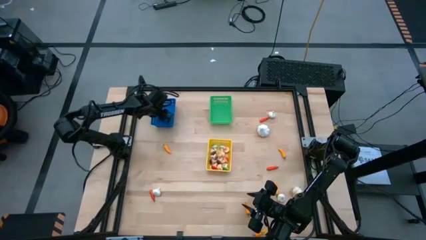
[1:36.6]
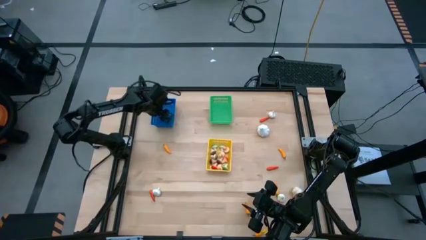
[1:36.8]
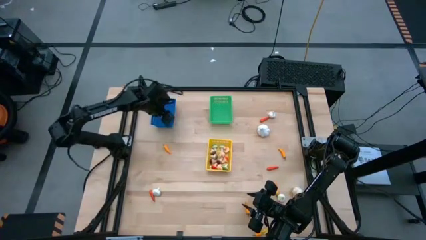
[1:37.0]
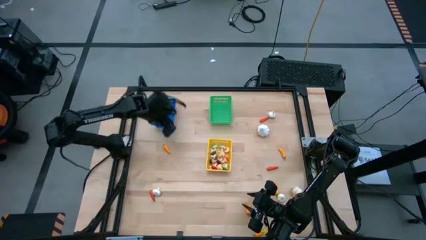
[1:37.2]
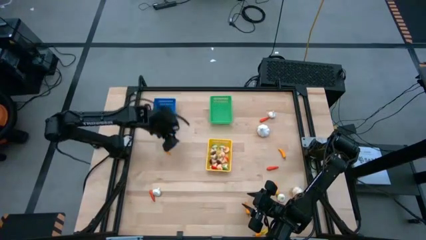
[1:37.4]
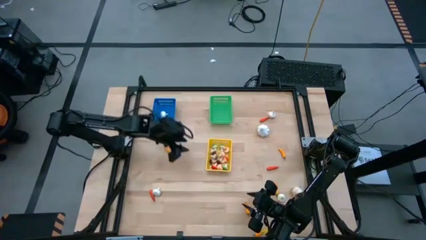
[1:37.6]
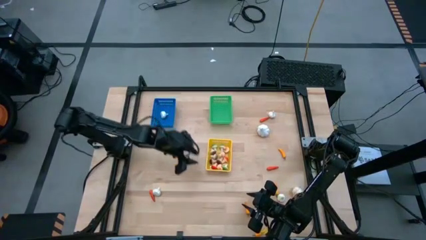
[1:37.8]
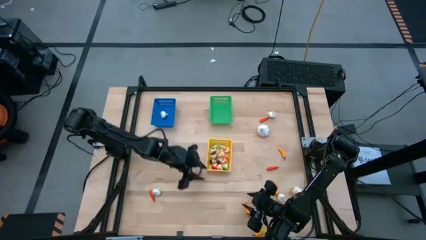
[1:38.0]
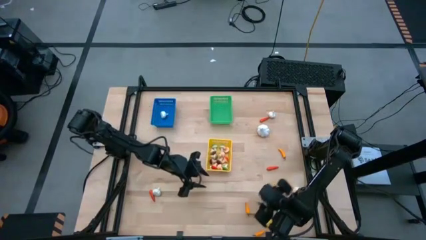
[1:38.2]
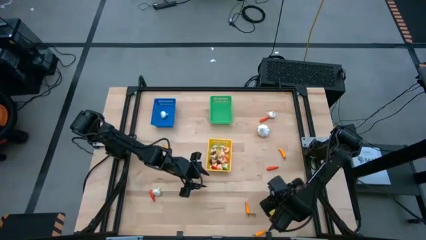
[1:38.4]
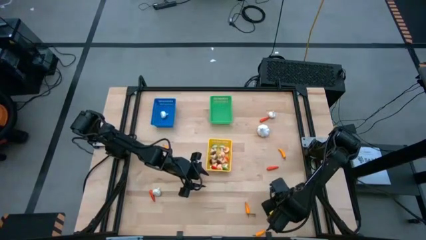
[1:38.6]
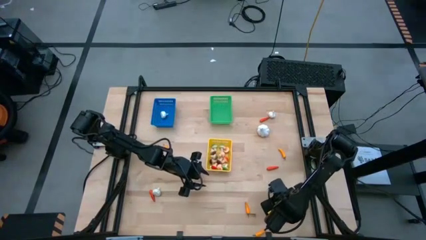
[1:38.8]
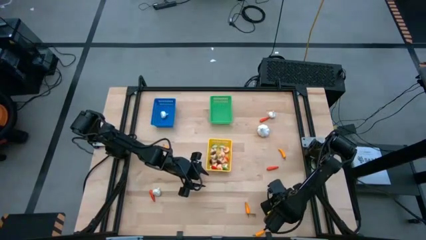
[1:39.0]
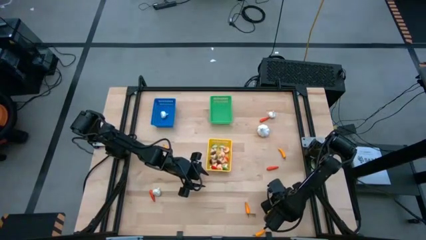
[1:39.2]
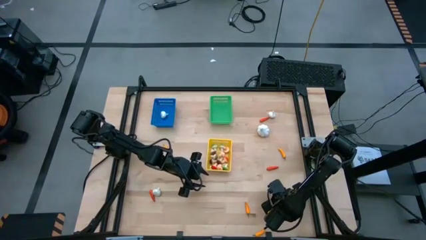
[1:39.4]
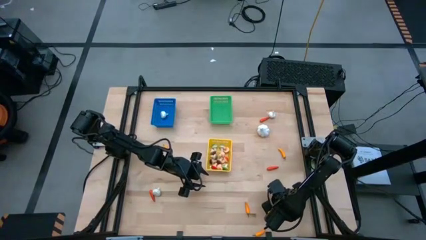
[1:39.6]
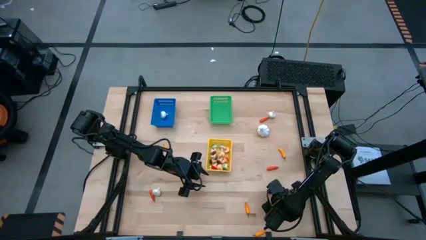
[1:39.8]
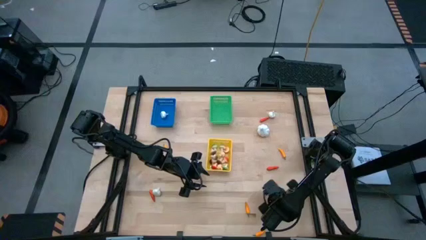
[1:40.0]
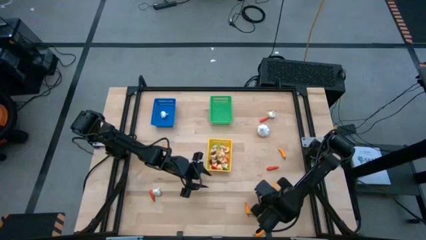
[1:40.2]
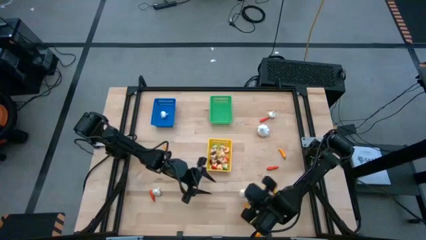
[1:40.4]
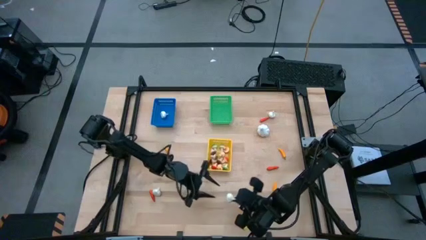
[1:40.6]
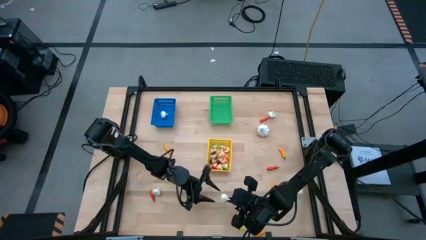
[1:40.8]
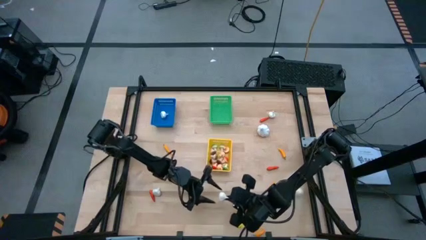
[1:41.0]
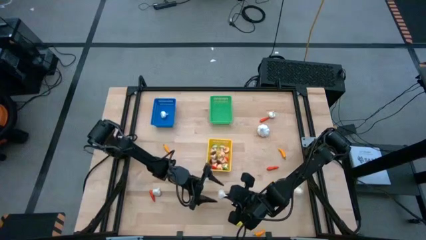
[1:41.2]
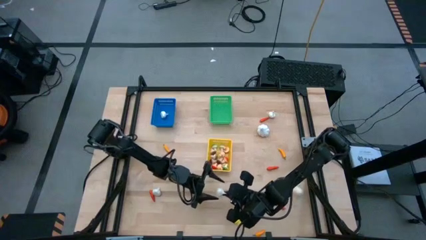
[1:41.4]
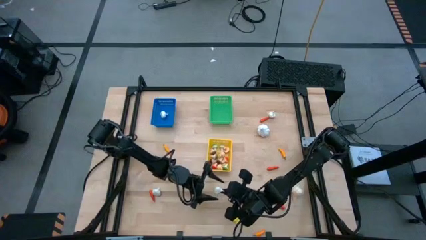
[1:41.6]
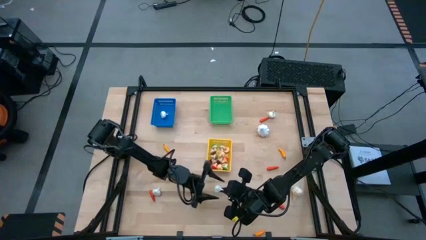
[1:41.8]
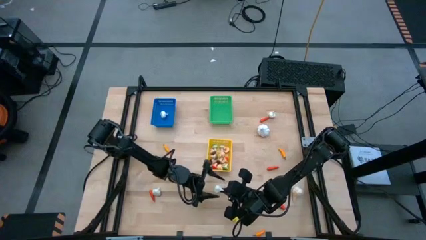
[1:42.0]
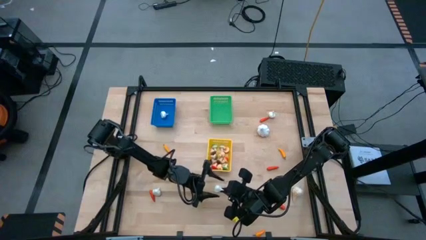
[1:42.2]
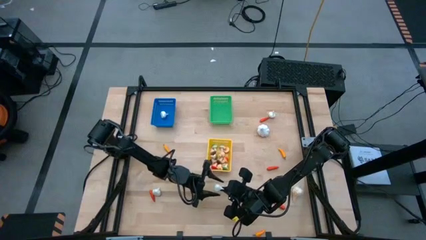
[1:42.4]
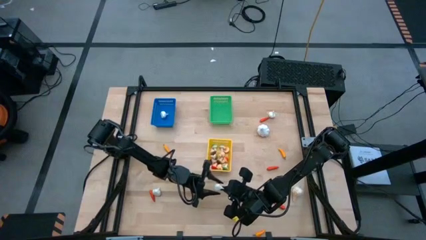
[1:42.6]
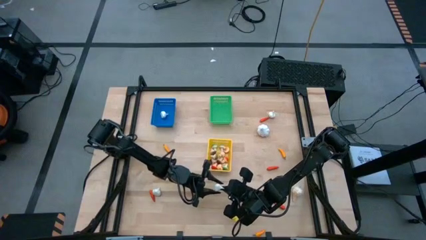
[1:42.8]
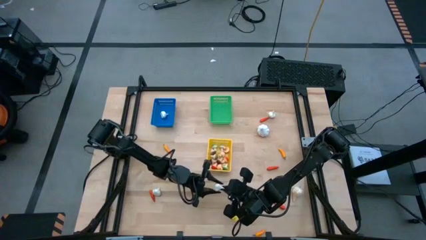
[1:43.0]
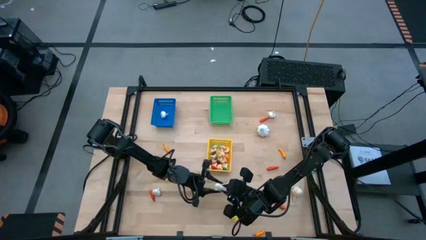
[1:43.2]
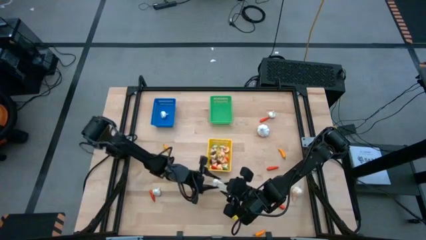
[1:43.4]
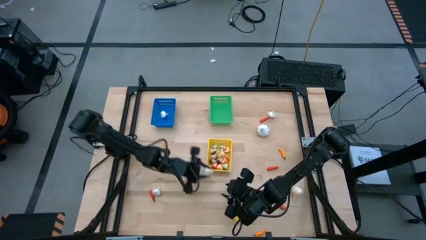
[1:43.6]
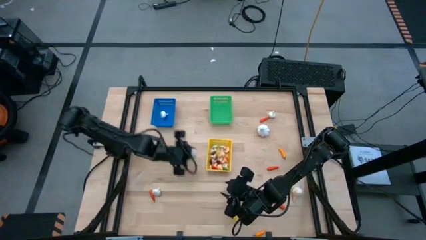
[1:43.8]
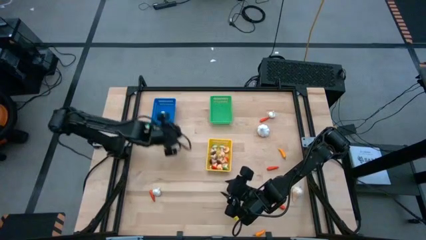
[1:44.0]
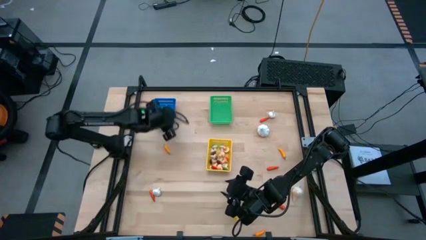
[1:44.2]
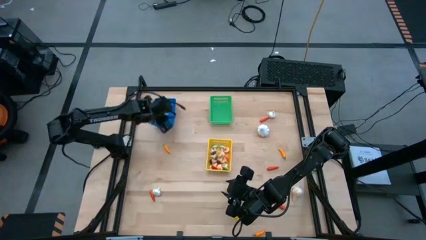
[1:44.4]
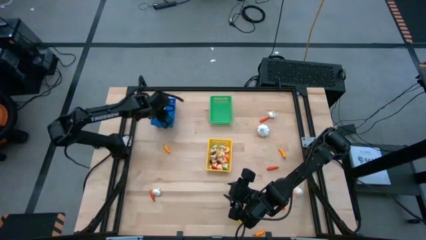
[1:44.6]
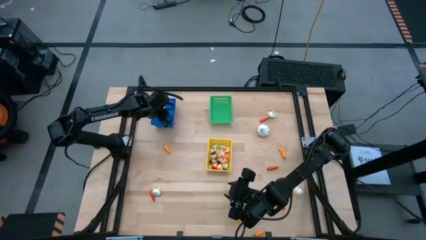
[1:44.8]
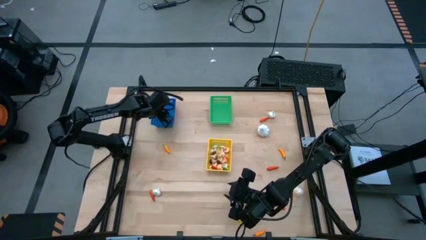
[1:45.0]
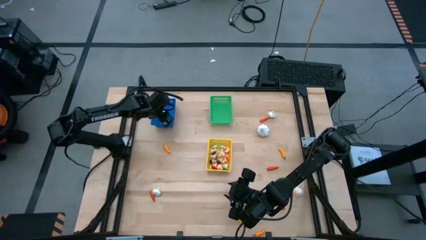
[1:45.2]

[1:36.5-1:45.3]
Task: Sort produce into baskets
Put the white garlic into the blue bin

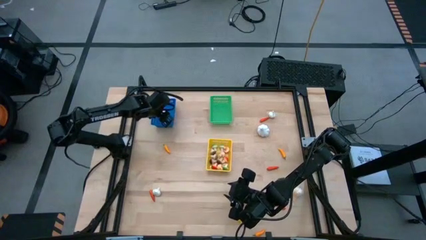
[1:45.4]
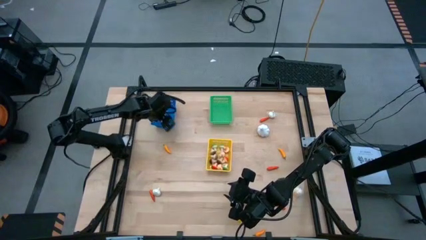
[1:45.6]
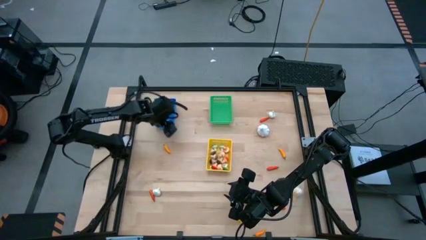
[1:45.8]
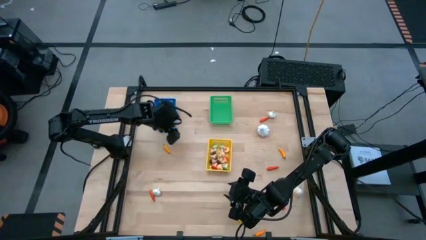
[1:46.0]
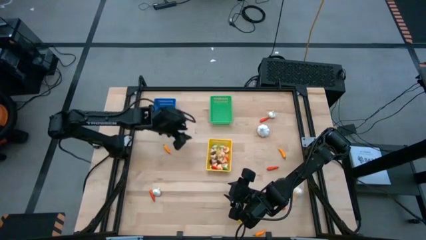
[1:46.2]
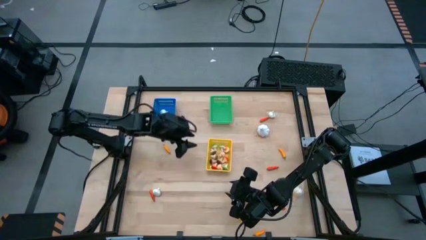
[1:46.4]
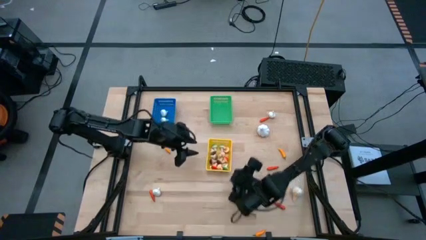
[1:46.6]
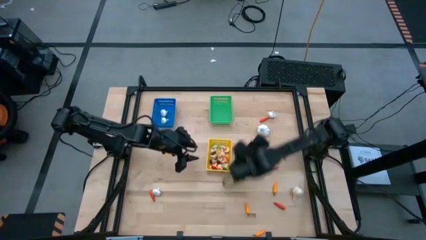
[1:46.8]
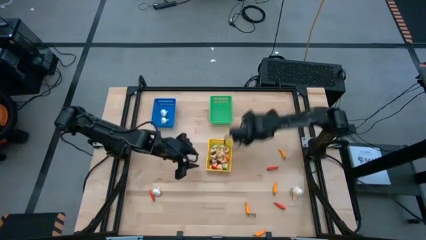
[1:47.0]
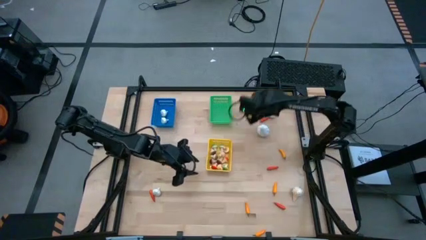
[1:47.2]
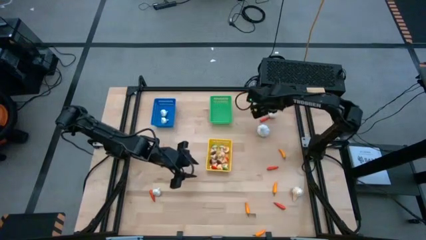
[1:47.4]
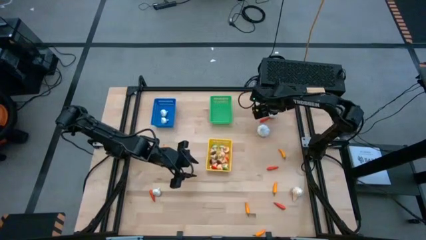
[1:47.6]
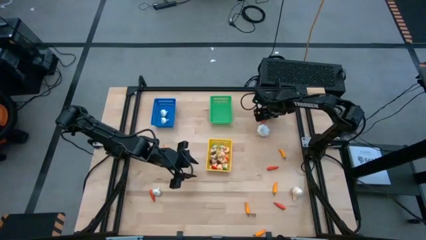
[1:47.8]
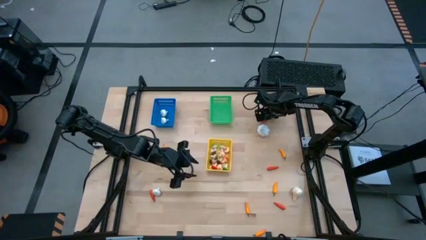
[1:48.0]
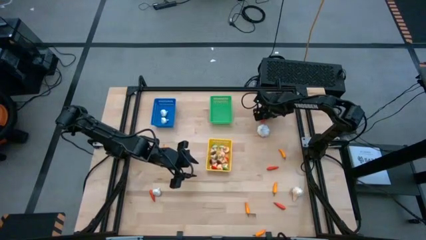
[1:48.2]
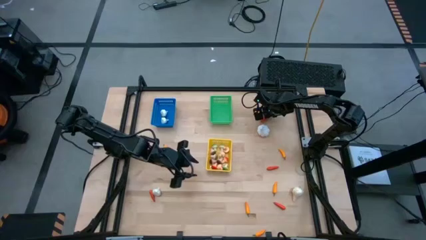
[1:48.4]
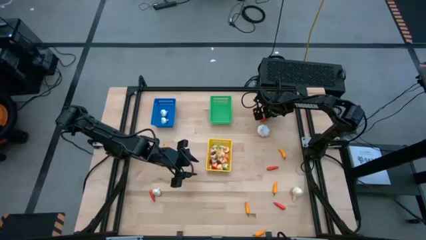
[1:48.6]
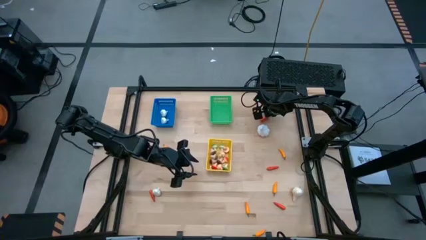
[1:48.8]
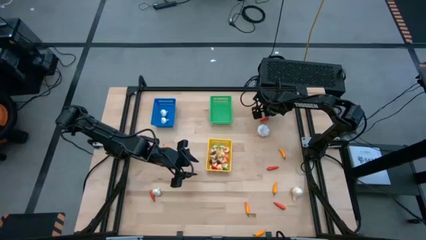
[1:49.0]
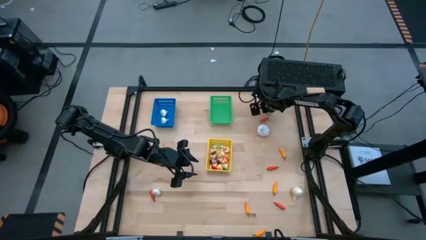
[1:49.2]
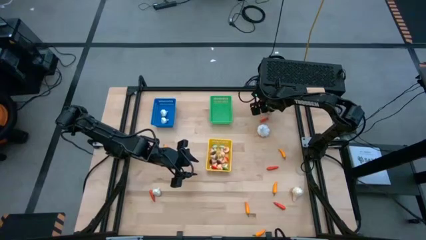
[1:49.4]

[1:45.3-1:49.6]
Put the white garlic into the blue bin

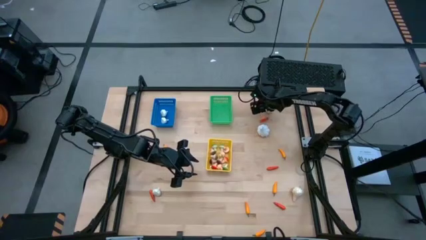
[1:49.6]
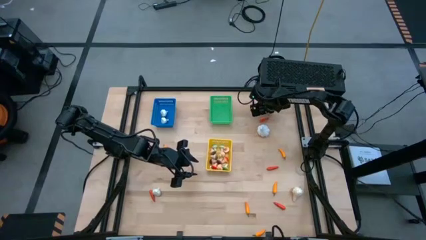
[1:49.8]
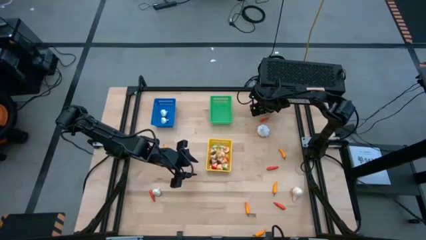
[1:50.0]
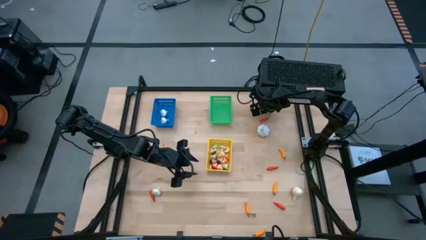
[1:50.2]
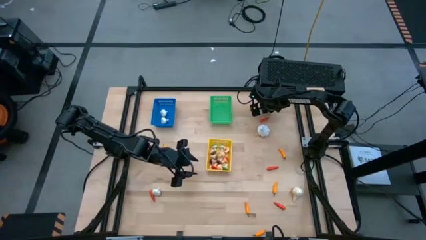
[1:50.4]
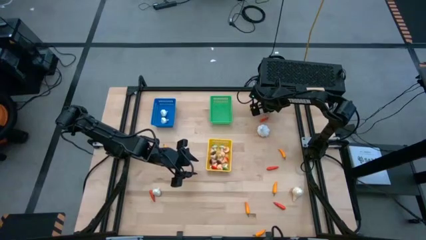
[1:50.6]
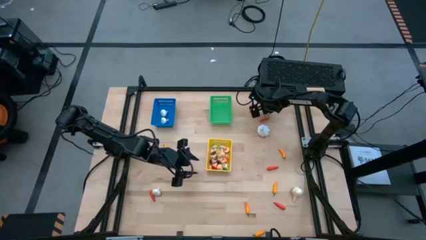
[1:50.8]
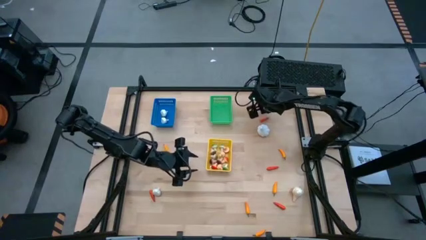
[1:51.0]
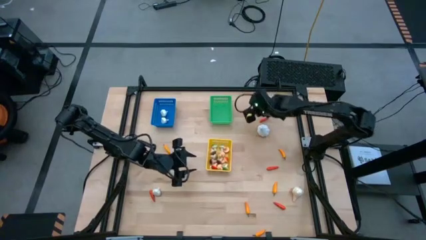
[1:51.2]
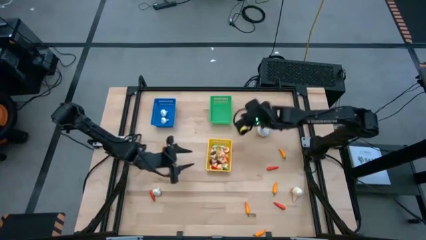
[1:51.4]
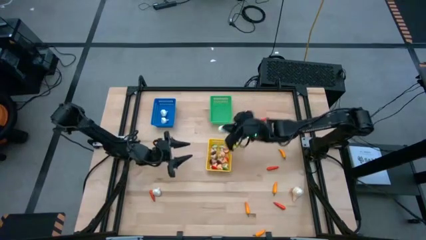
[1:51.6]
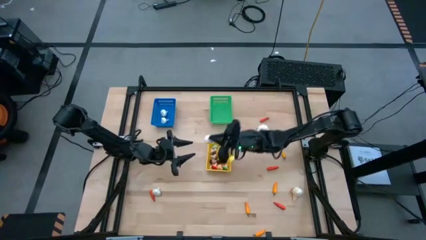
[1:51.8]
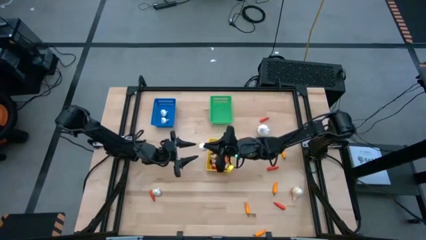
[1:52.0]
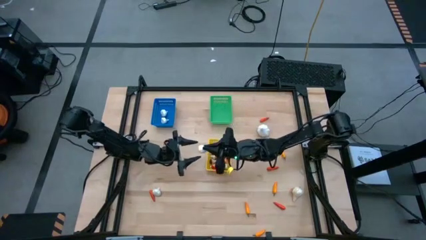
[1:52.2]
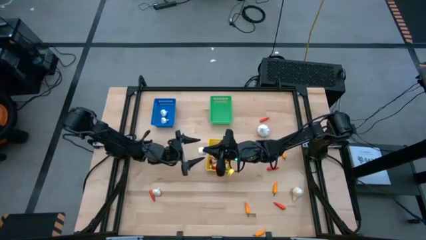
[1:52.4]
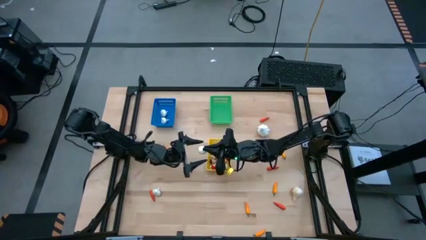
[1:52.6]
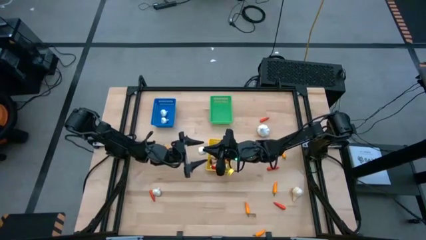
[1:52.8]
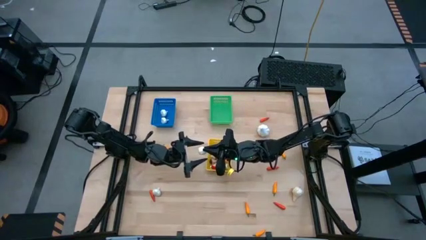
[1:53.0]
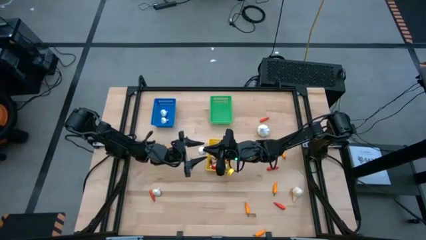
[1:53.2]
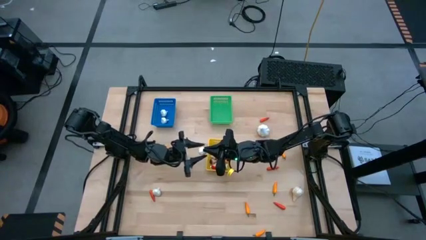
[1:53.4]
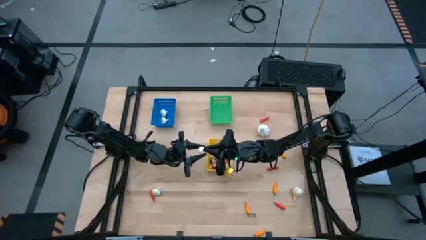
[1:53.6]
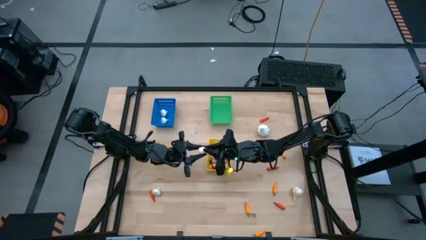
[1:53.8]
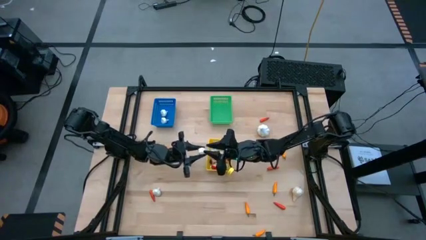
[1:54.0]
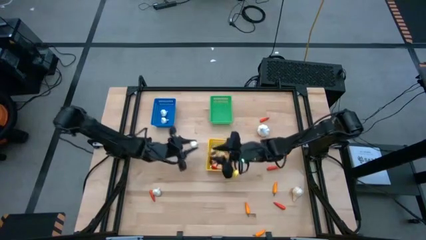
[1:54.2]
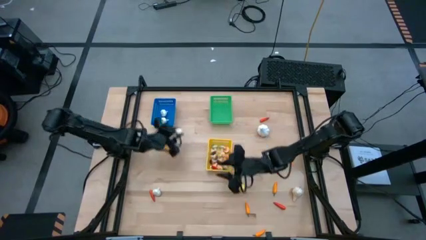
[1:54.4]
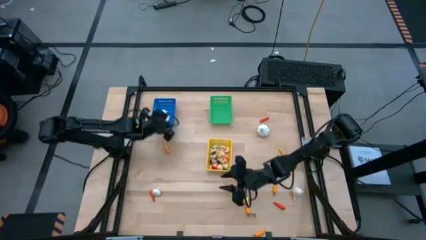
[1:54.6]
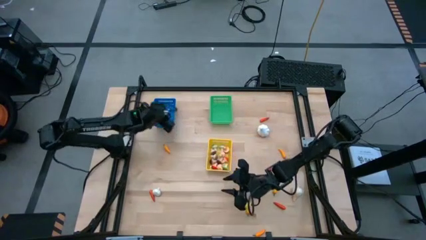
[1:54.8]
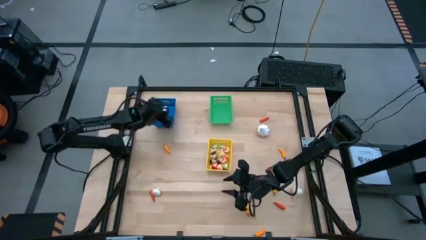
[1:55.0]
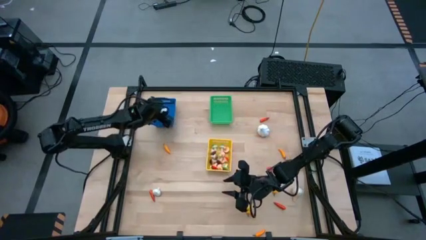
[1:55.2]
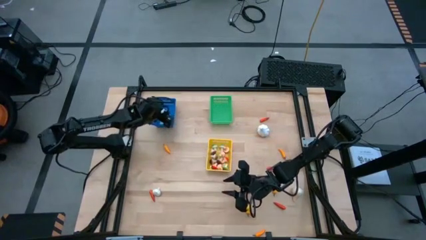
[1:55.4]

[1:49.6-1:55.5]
Put the white garlic into the blue bin
